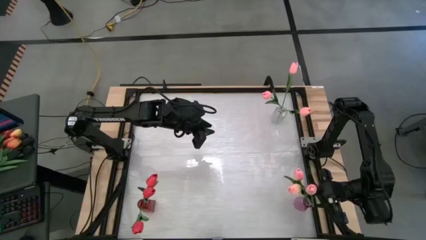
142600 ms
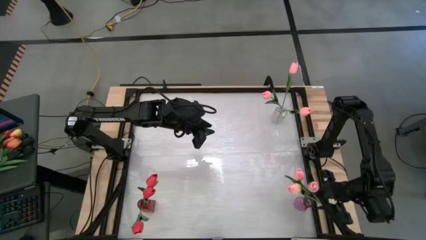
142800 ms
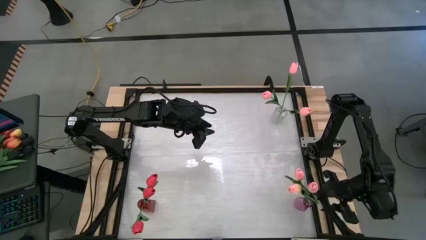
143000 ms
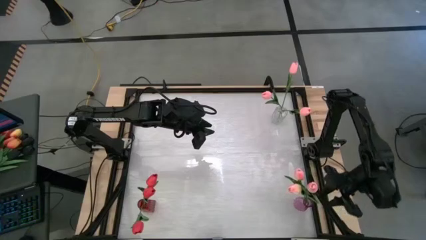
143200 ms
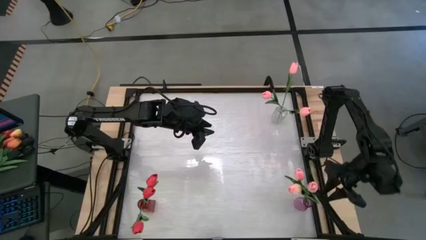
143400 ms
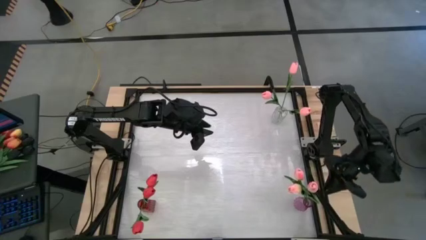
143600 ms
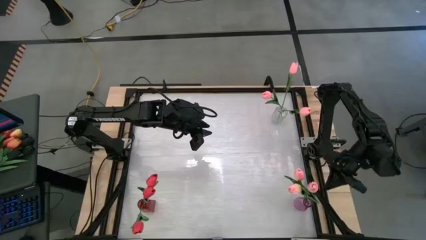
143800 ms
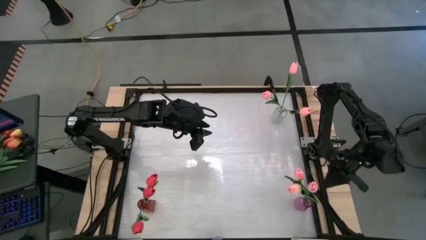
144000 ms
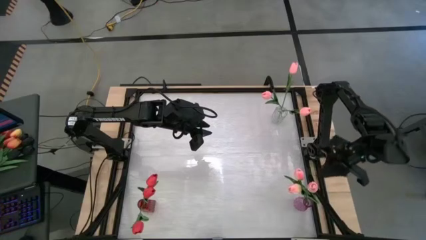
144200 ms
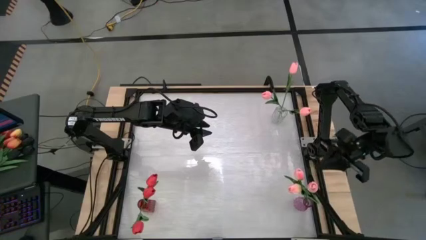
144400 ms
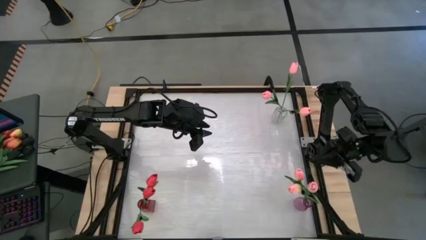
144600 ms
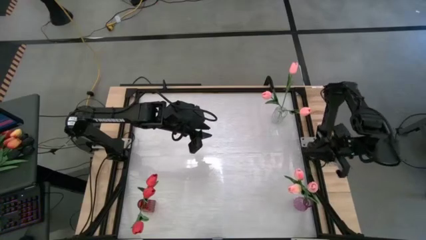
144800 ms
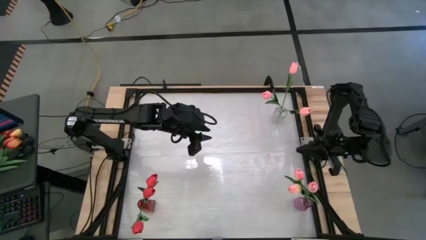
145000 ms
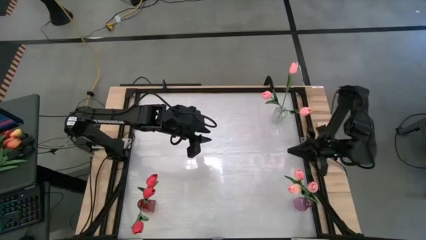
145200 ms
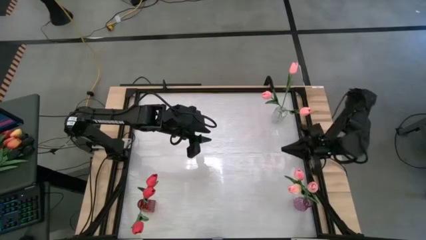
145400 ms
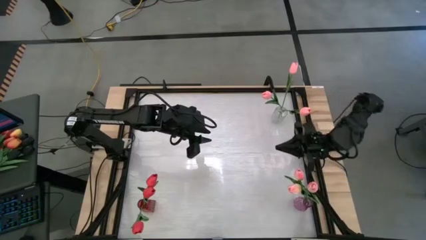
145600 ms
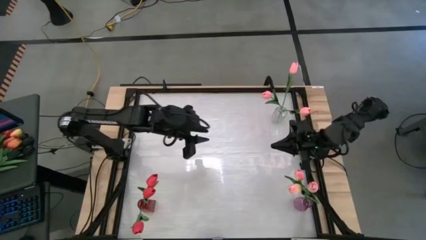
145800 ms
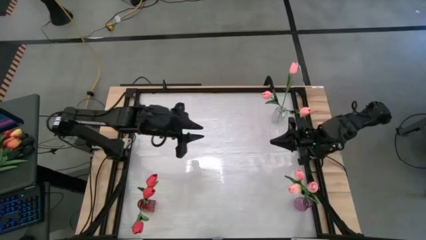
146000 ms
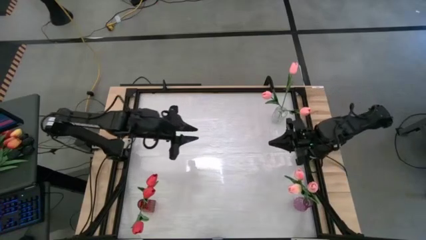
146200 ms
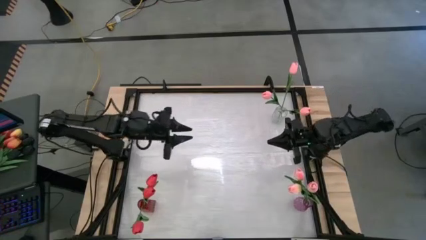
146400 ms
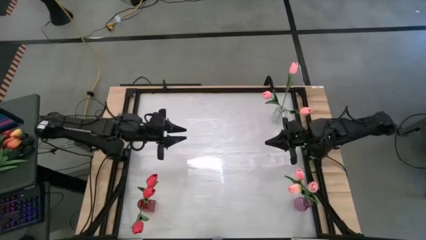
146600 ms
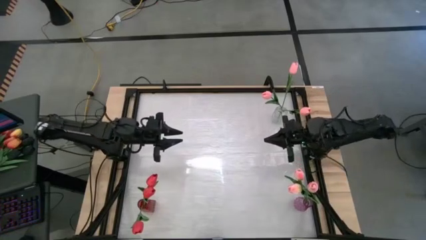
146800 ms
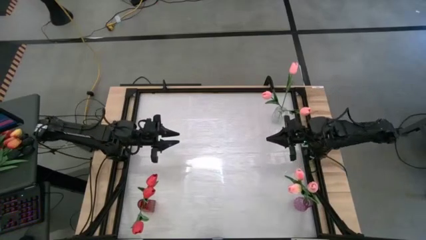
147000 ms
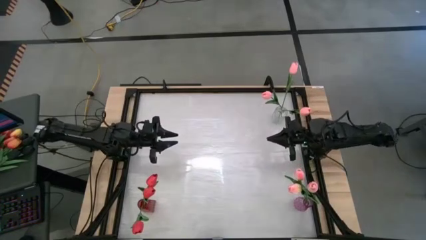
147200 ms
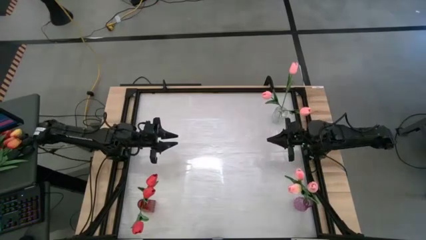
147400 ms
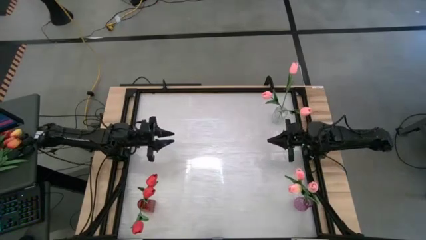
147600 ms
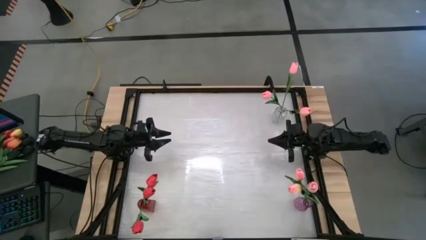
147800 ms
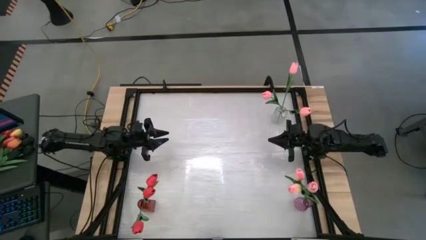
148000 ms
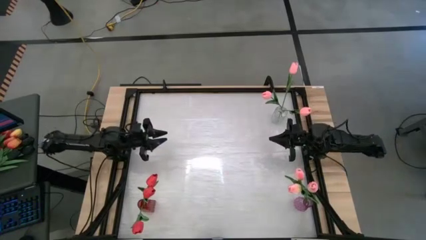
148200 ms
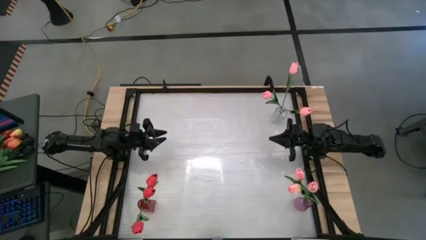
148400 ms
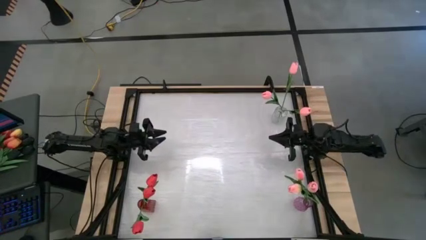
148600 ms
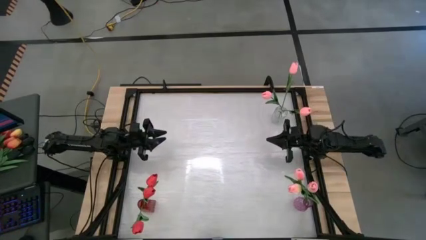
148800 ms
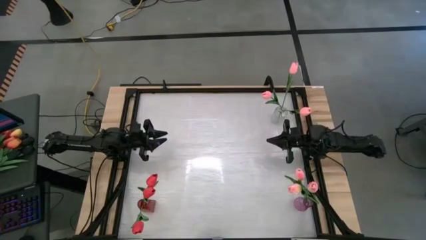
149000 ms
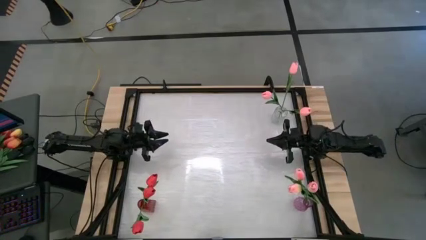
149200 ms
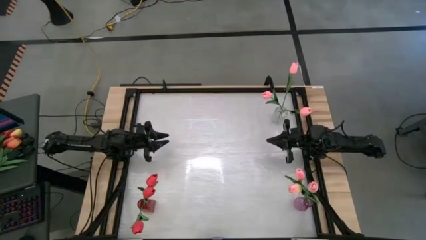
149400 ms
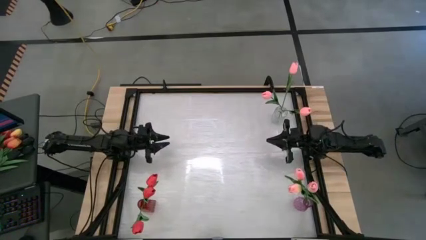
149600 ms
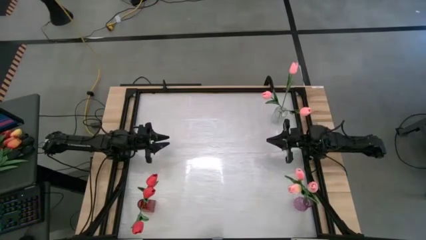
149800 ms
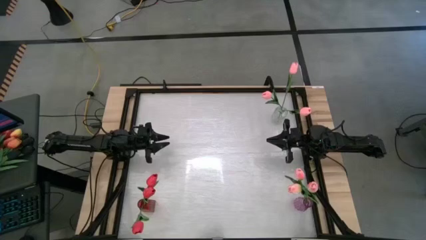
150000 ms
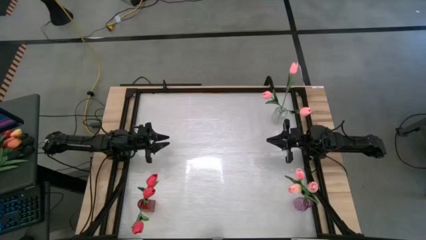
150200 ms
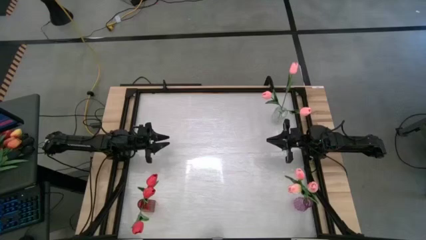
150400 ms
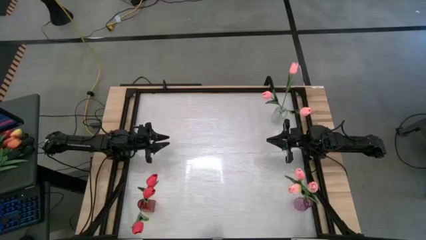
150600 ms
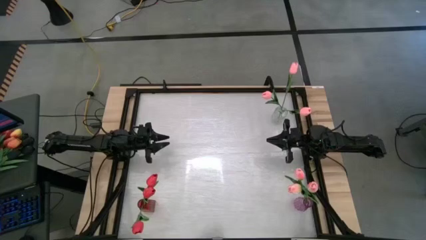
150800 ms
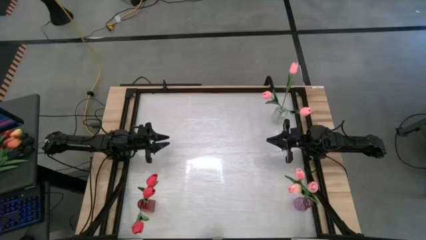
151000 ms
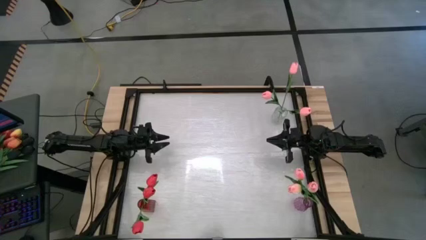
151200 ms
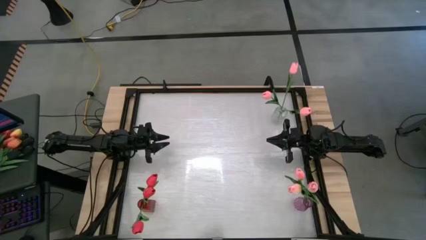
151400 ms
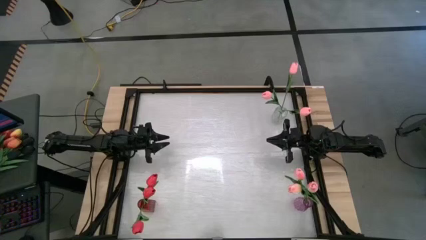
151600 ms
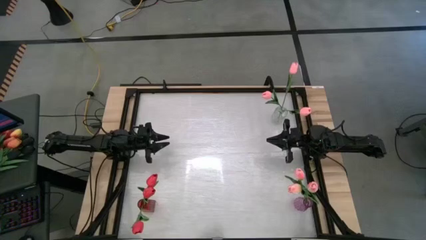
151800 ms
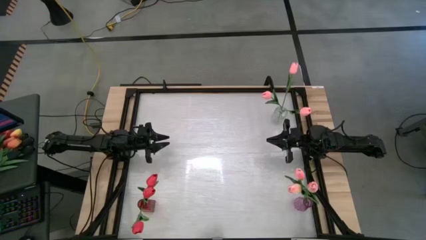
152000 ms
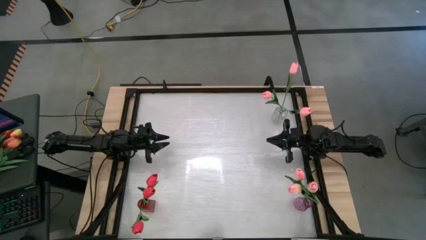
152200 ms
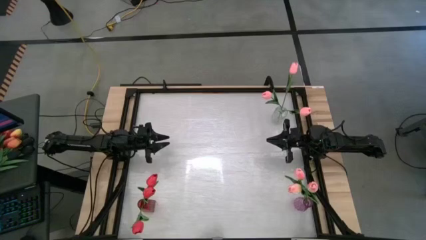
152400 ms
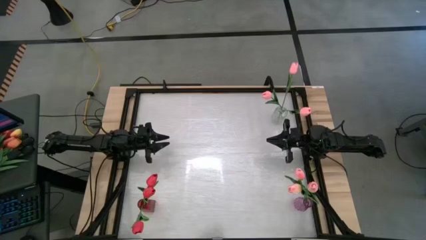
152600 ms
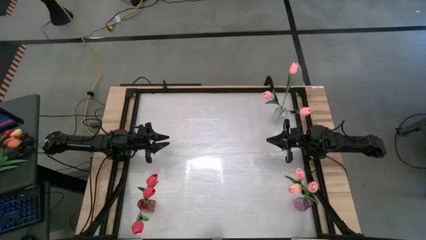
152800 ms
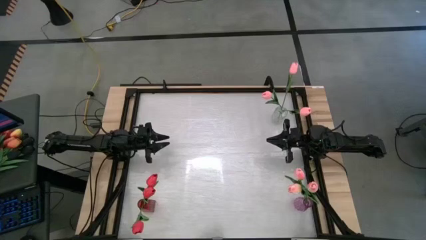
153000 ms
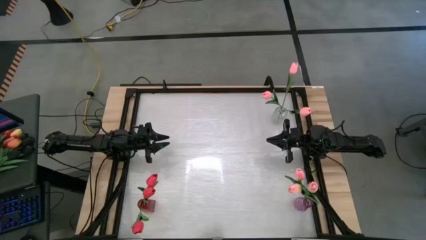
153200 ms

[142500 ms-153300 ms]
Task: Sort flowers into vase by color
Return to Home Position

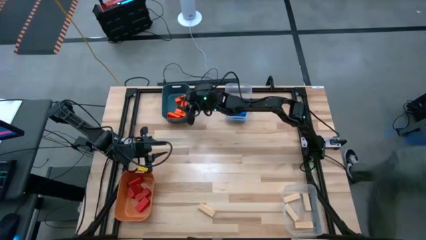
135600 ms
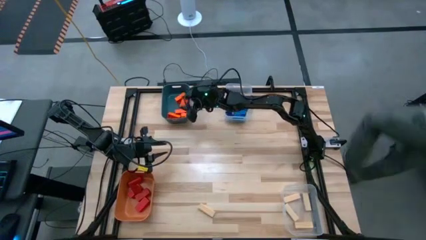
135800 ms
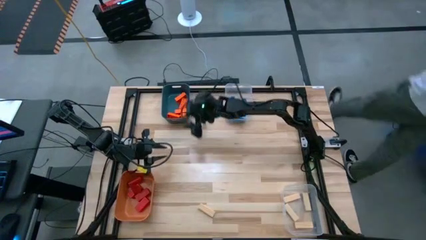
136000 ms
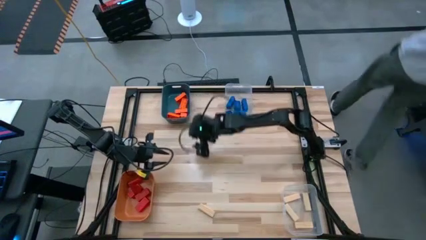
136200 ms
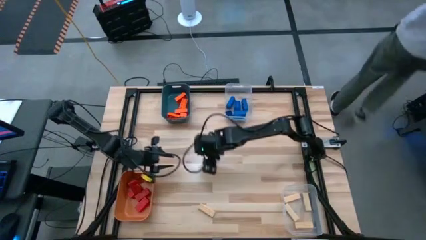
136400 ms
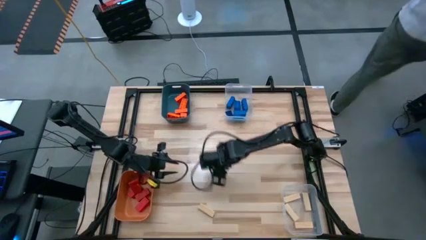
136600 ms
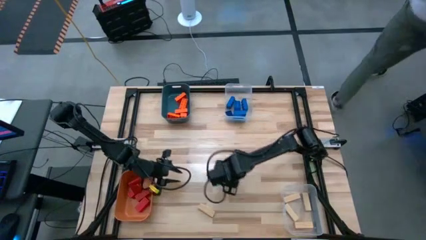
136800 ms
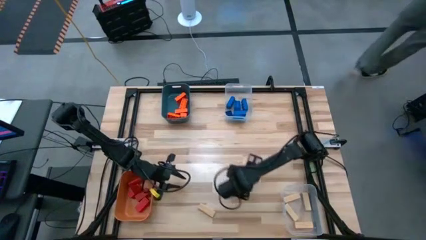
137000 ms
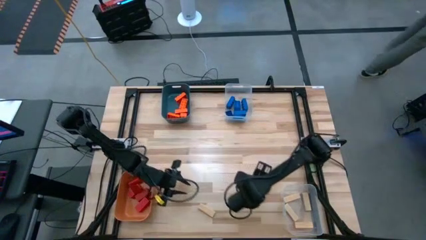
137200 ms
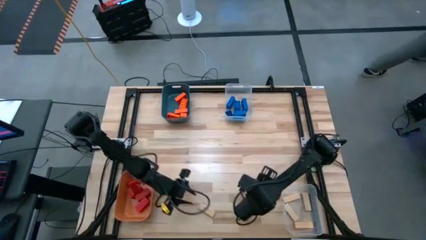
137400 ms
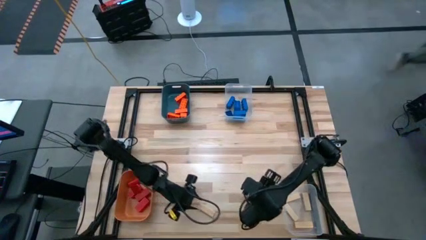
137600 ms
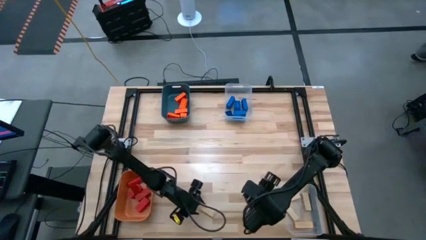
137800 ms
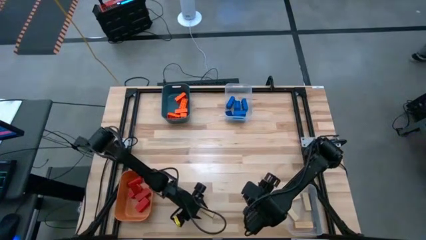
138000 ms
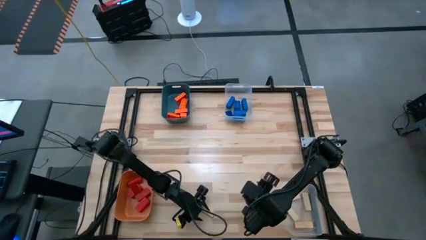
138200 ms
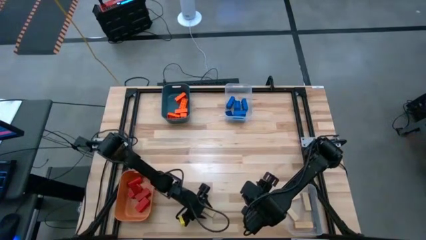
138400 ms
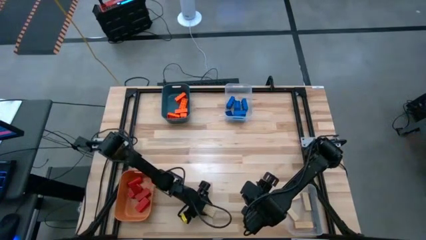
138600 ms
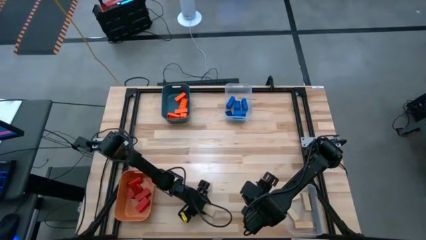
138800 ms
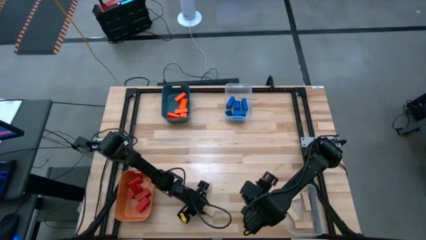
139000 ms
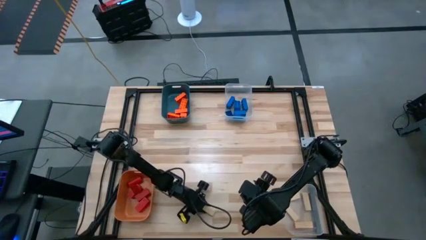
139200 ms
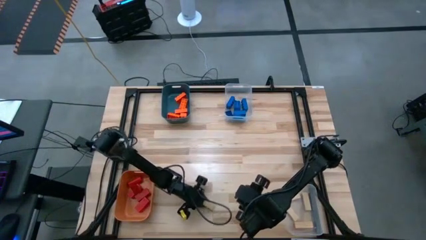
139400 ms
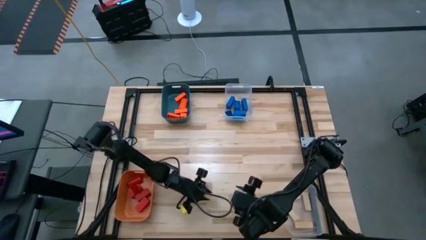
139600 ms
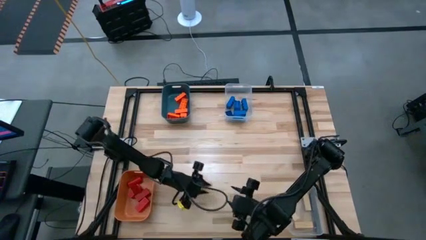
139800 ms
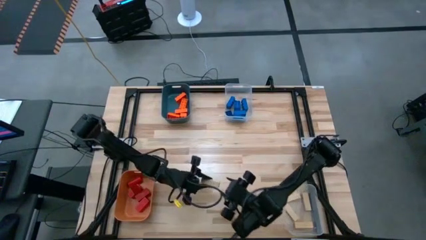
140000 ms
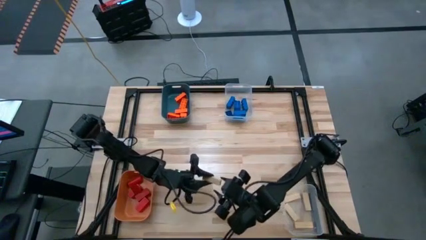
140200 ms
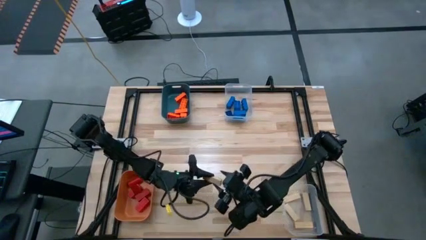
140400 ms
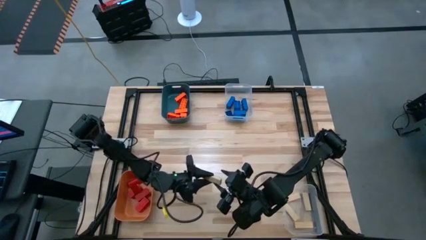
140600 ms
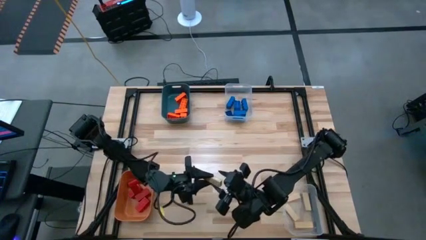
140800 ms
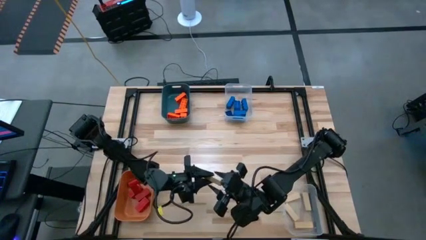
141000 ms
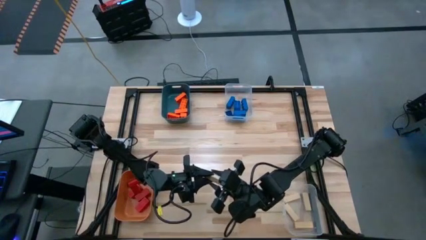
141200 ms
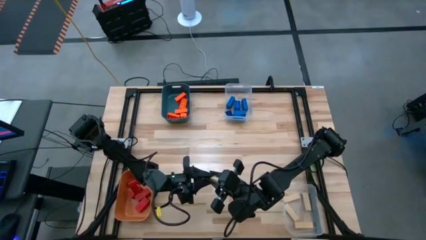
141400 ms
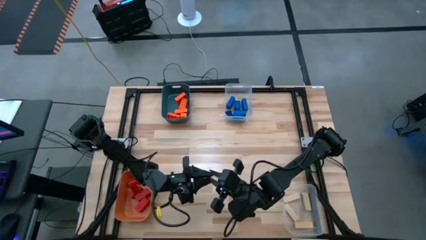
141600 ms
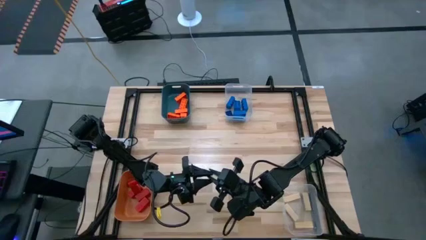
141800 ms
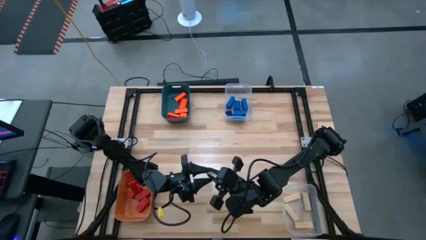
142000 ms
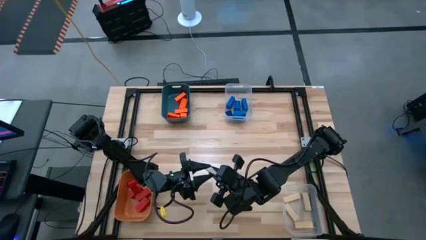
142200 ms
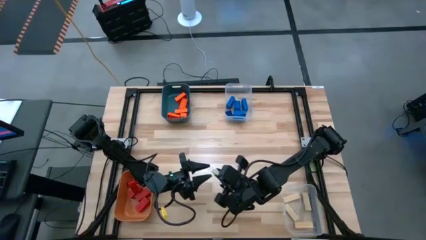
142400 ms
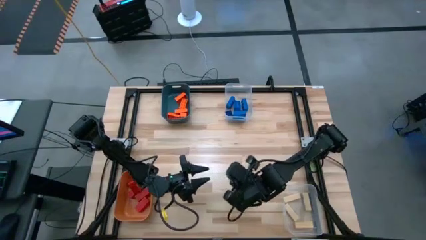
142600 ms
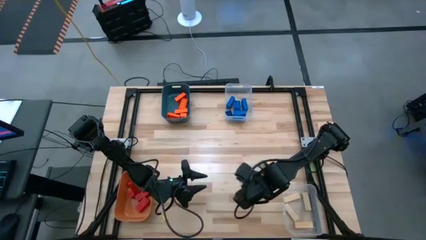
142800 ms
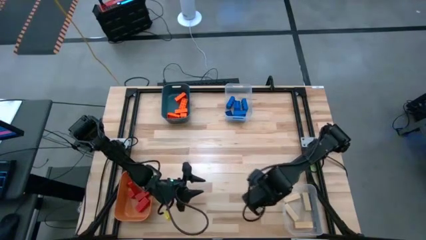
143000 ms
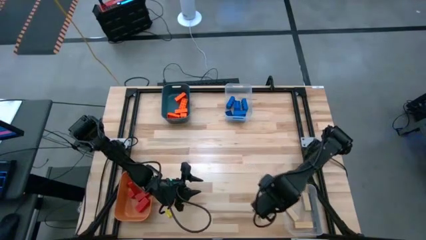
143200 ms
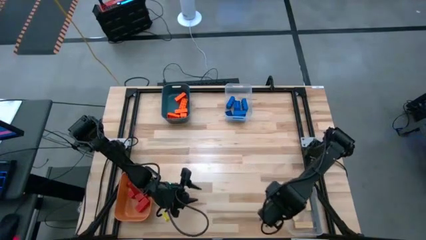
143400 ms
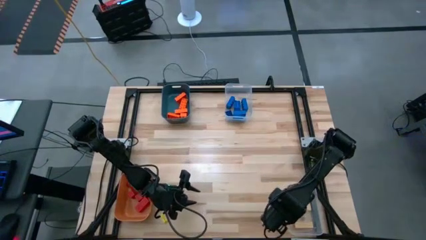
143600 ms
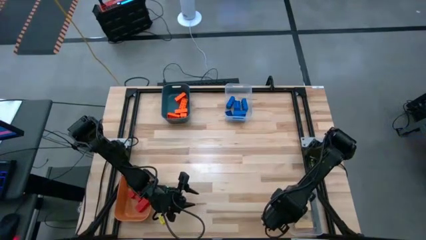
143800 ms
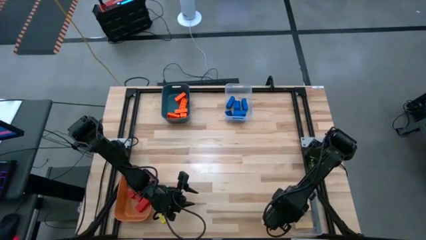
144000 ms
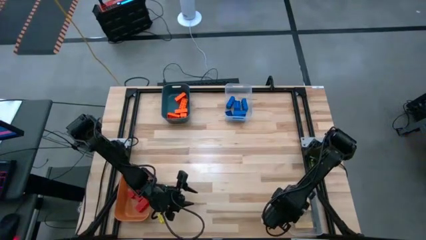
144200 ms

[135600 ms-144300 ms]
Task: Sort blocks
Put the brown block into the bottom transparent bin
